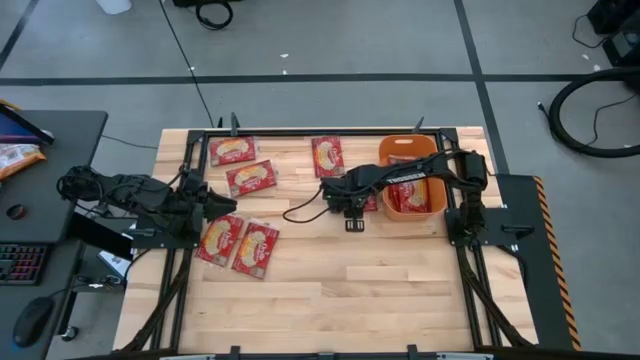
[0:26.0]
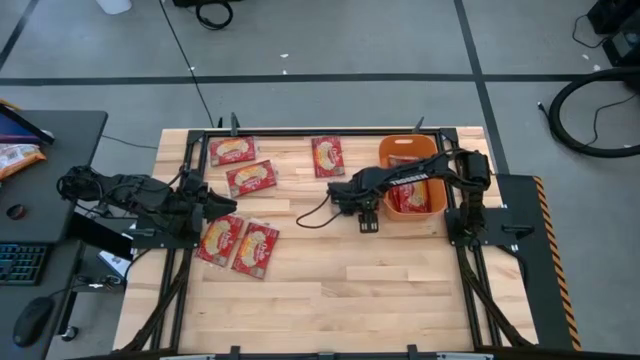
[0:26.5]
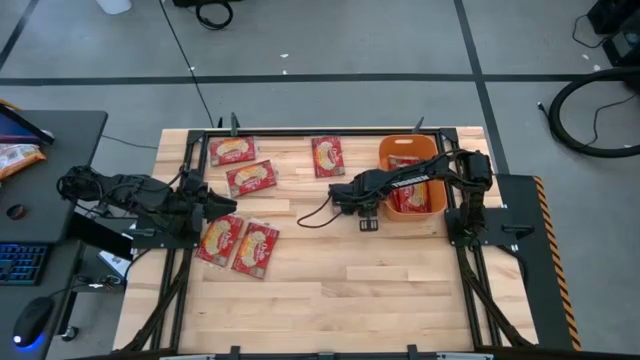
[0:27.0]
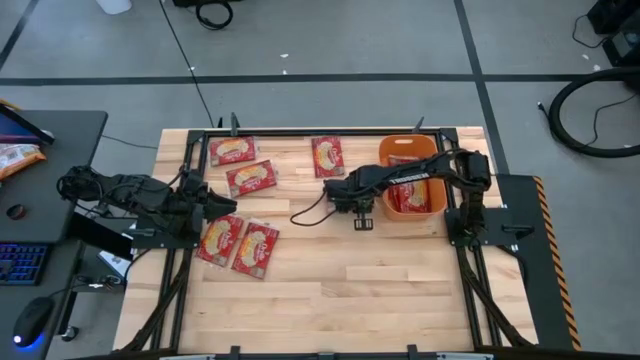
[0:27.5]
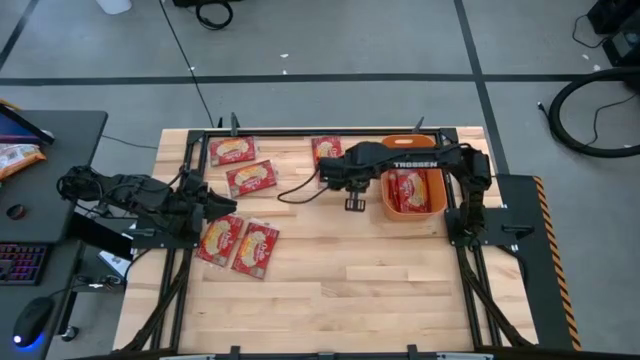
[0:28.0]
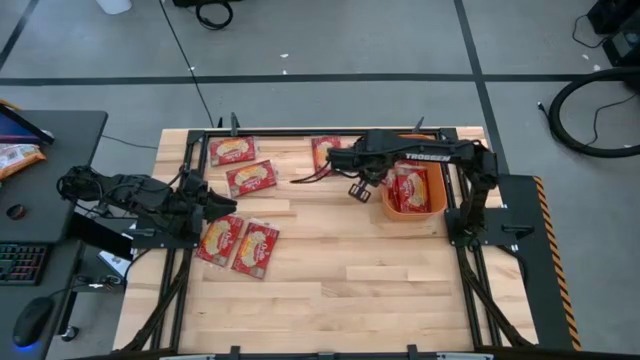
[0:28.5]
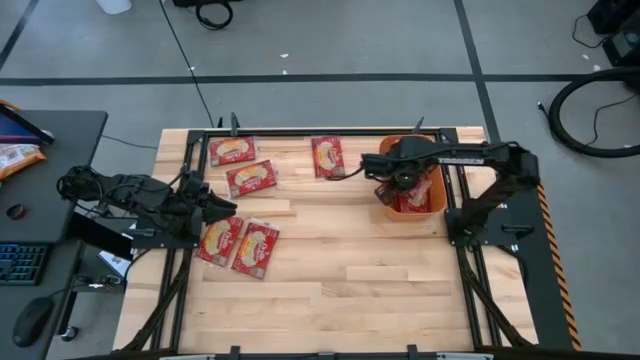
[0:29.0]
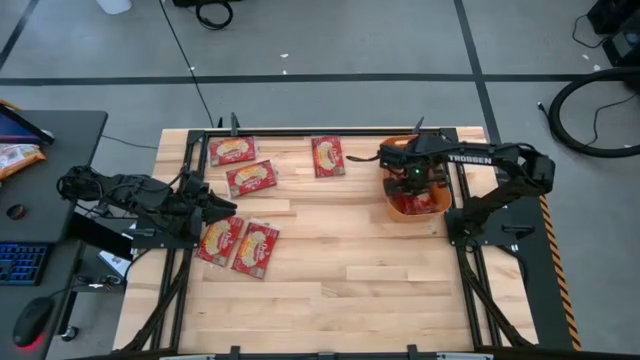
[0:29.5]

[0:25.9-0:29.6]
Task: Sort popcorn bags into baskets
Put the red popcorn bag into the orange bin

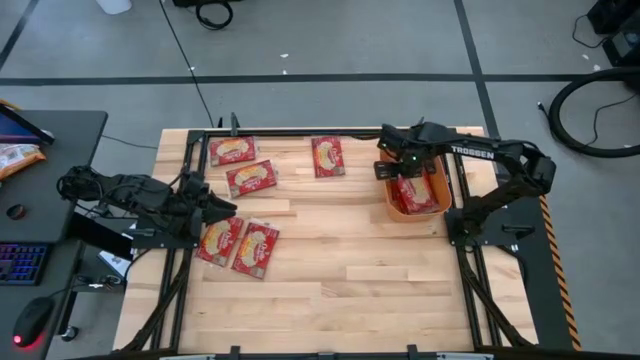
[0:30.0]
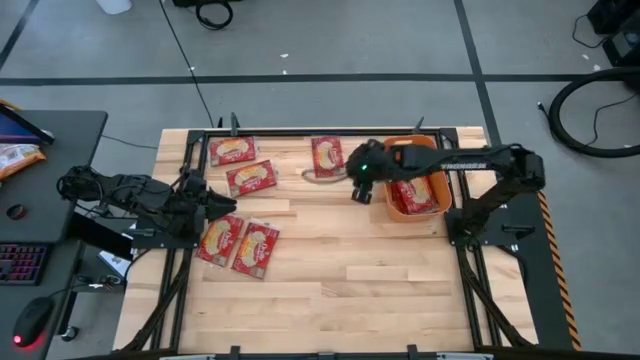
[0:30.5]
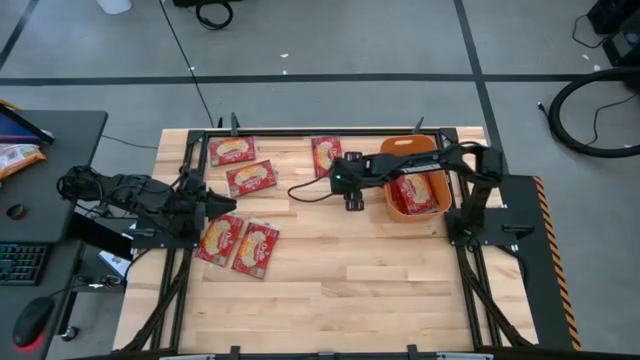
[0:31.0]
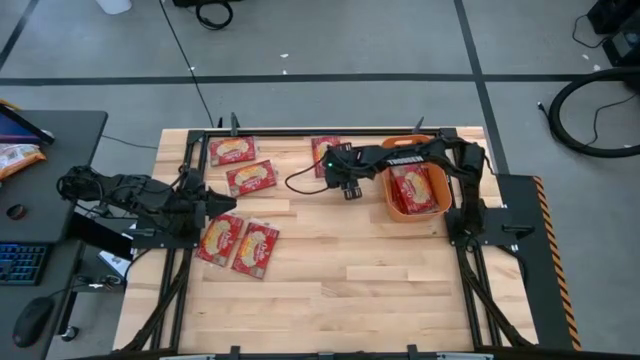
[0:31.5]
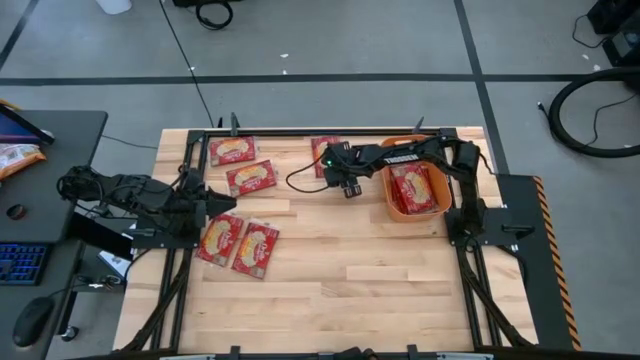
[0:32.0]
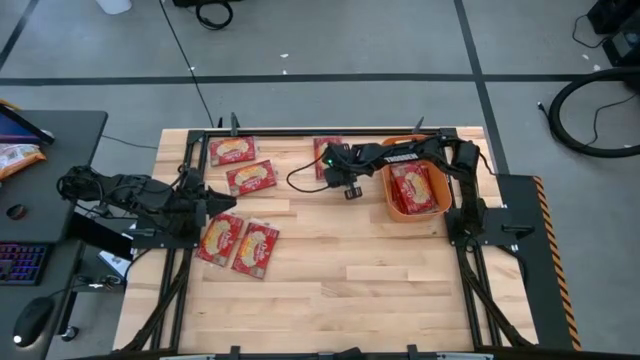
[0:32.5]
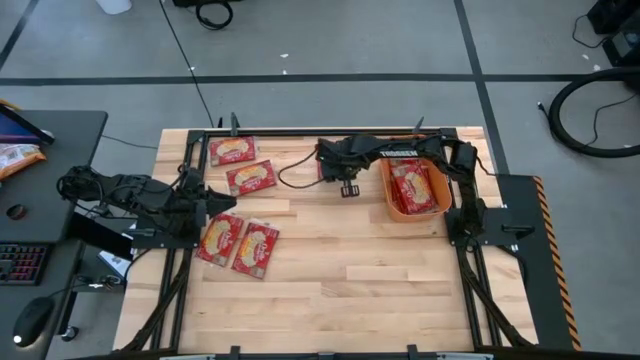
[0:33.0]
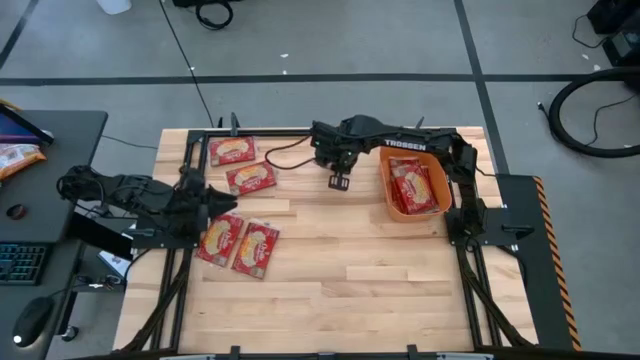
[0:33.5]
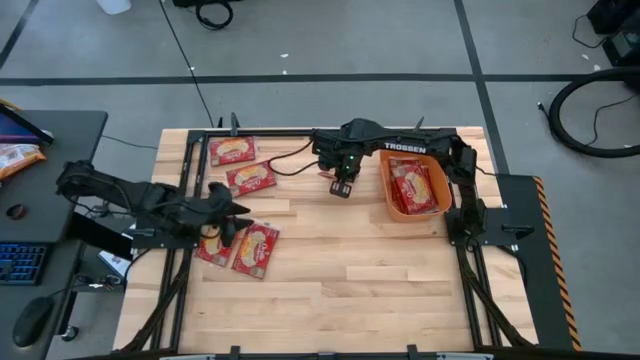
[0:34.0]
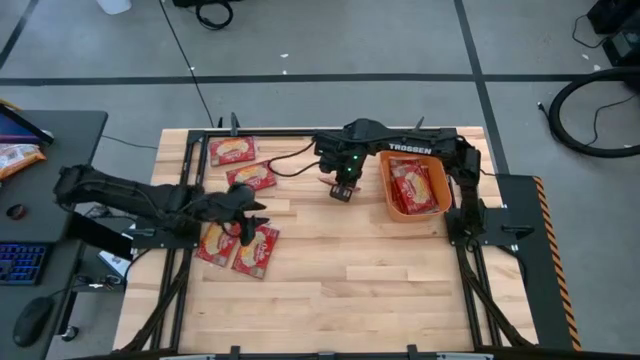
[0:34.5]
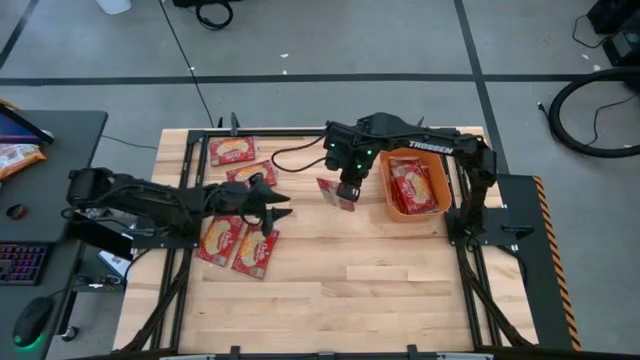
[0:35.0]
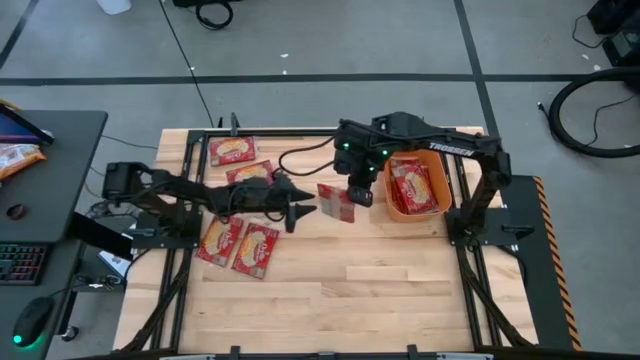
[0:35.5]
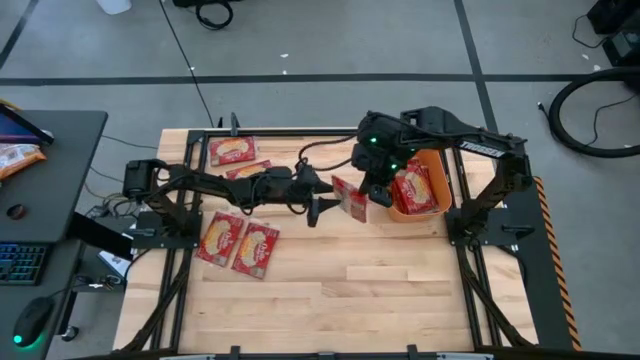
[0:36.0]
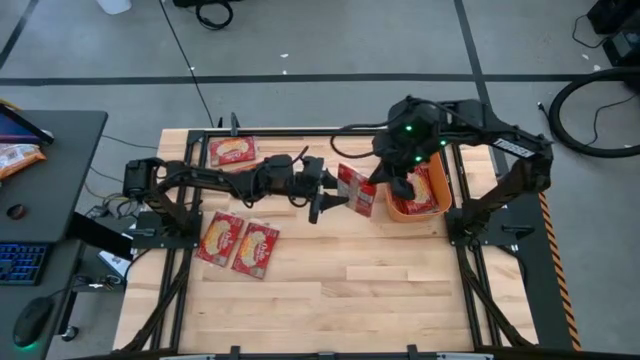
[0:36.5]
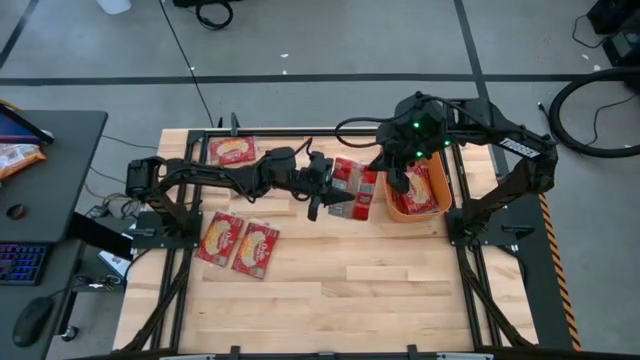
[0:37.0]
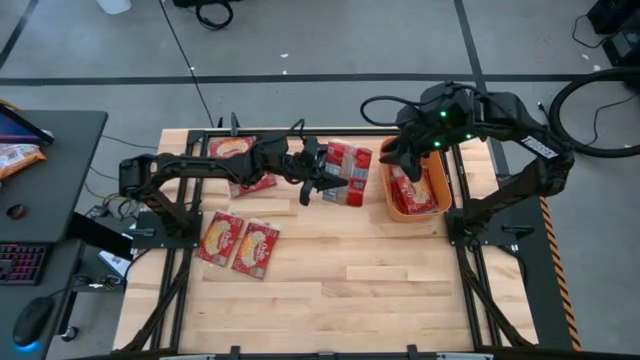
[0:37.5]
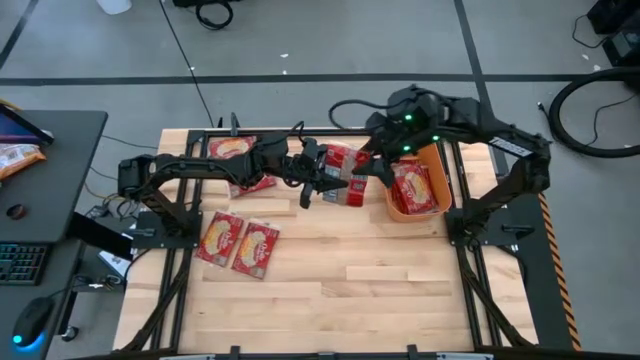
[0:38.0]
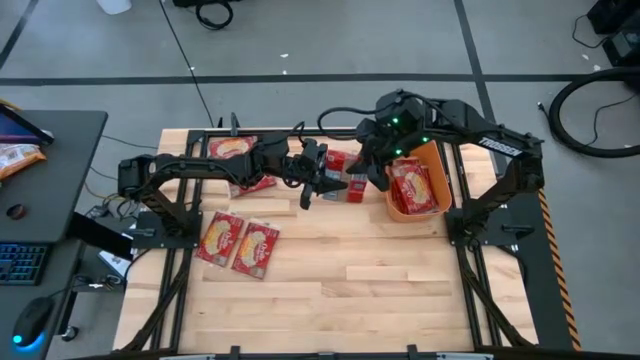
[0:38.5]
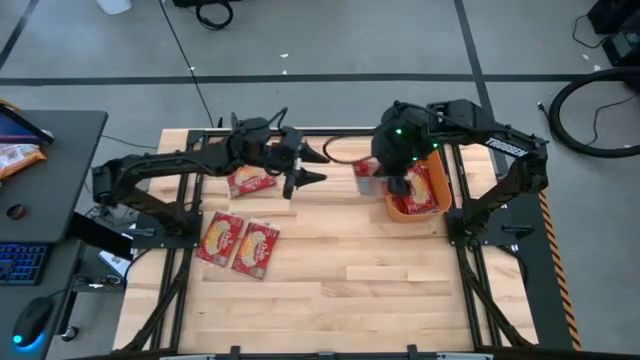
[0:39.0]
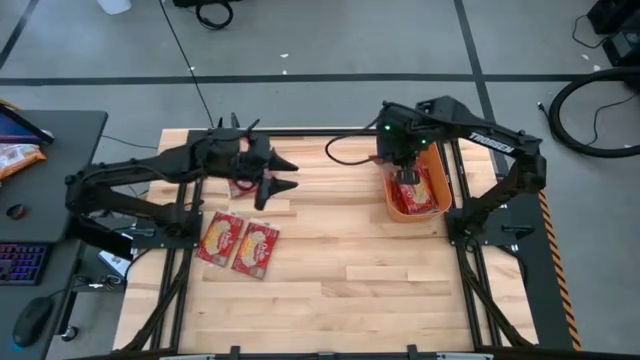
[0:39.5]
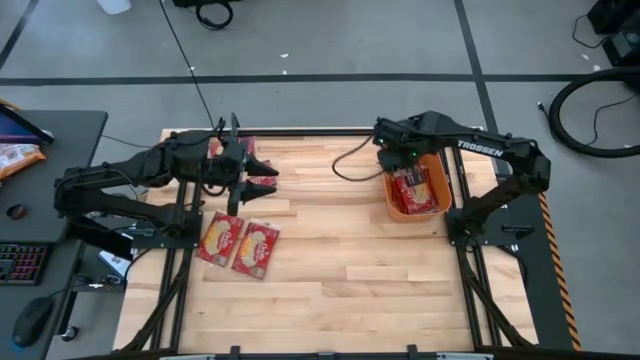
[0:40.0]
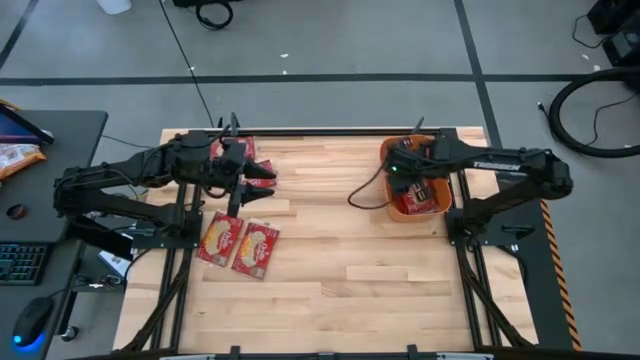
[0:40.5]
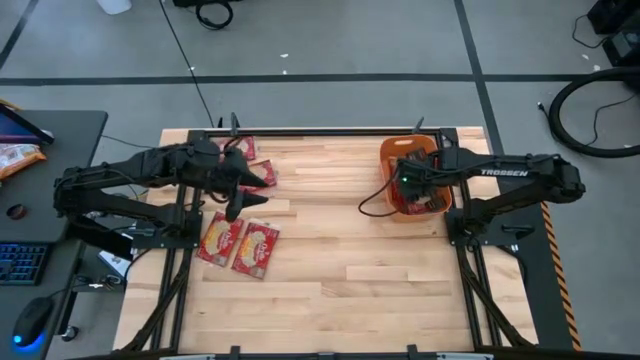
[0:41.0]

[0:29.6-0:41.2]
Put the red popcorn bag into the orange bin

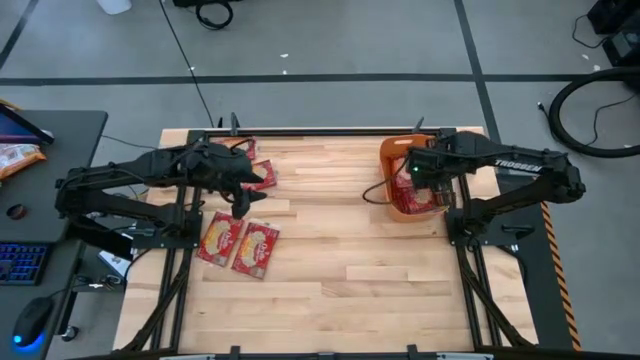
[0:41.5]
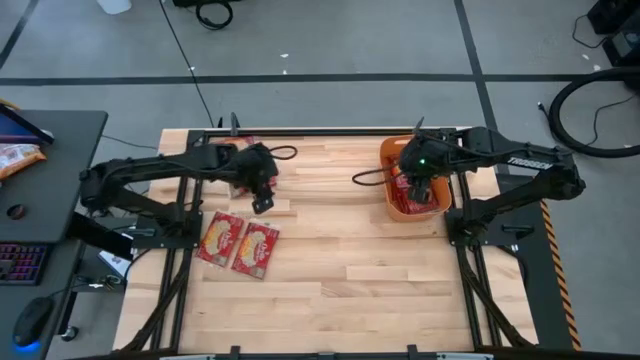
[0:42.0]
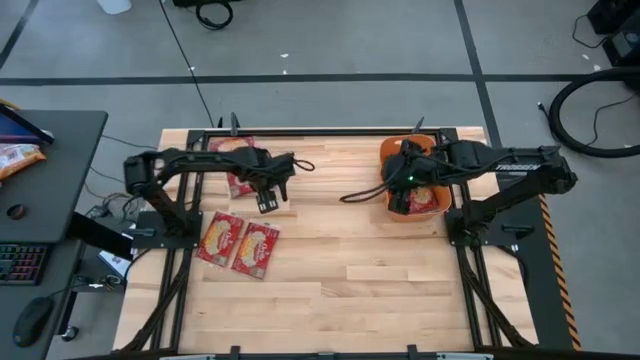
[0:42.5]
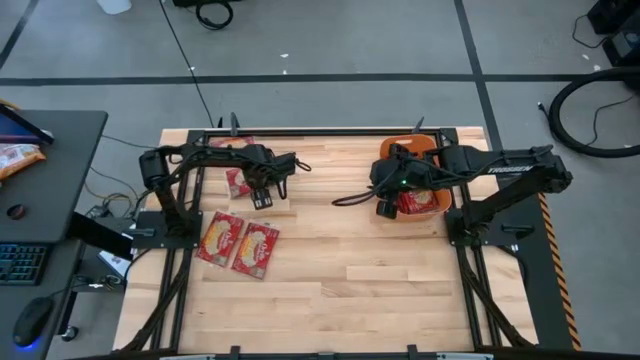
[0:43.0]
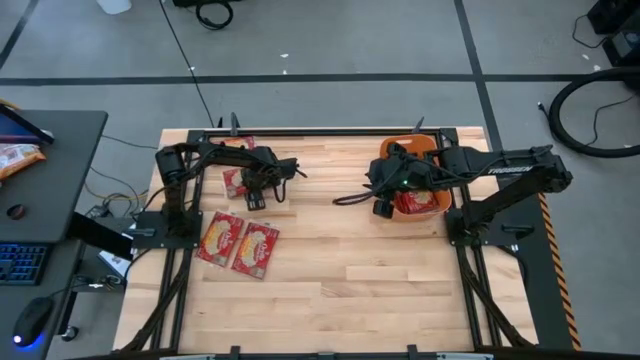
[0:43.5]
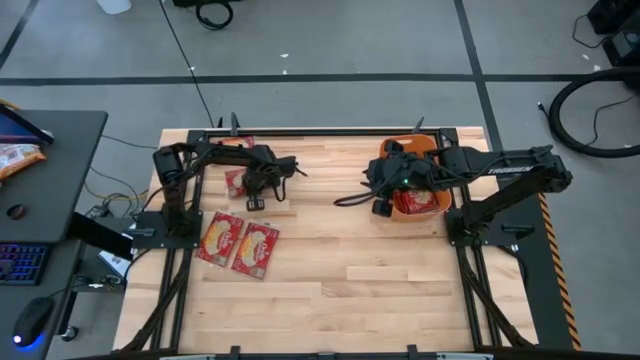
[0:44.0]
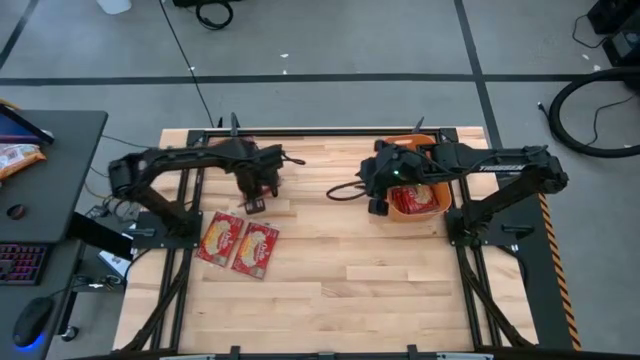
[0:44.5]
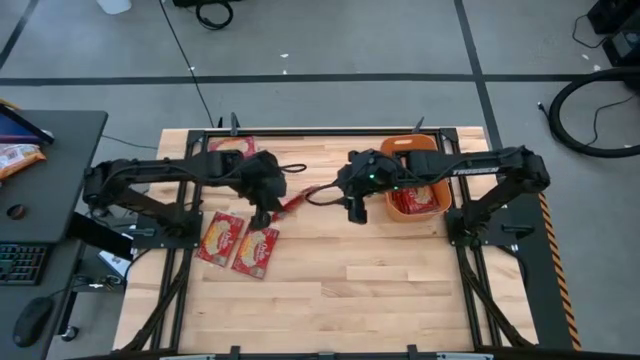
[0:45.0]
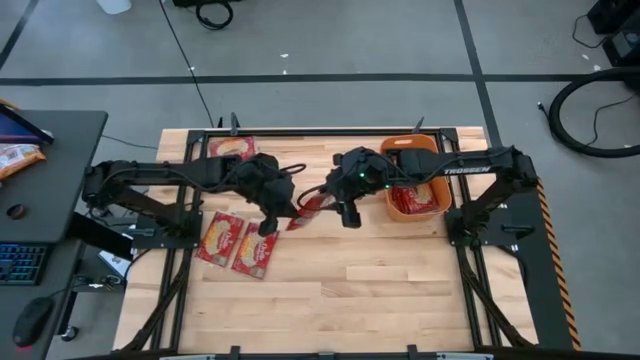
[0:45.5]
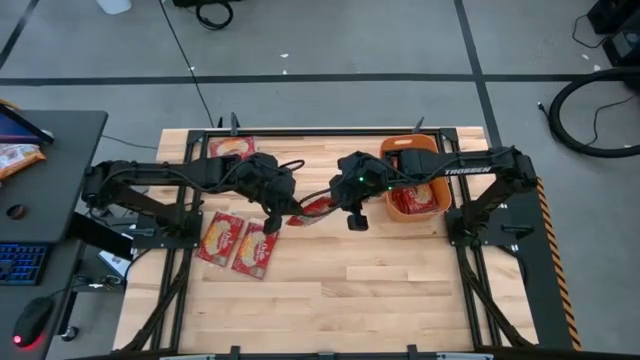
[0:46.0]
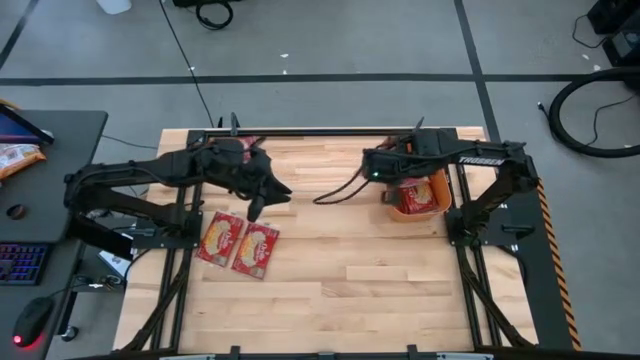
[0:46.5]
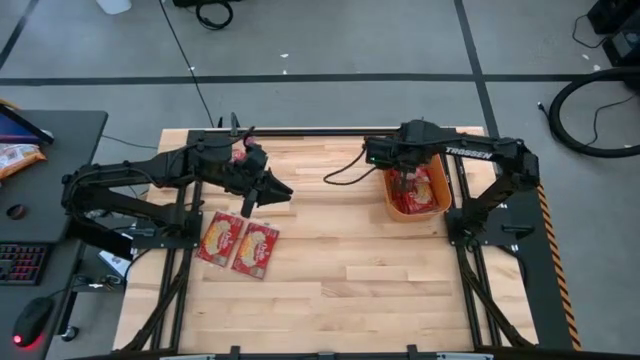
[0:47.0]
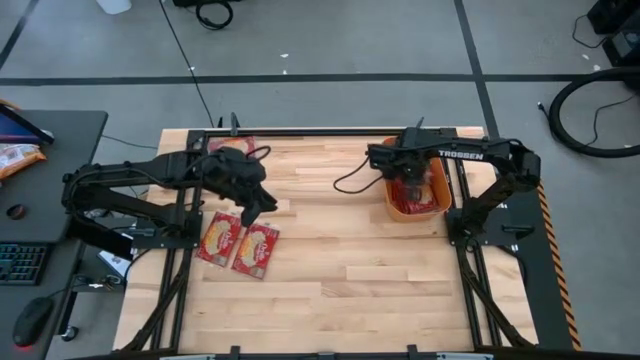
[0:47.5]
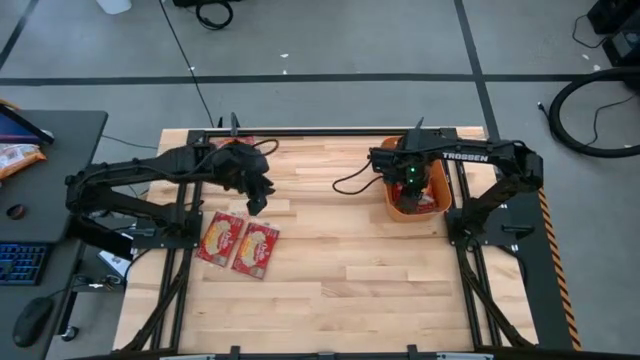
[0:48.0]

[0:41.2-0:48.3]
Put the red popcorn bag into the orange bin
